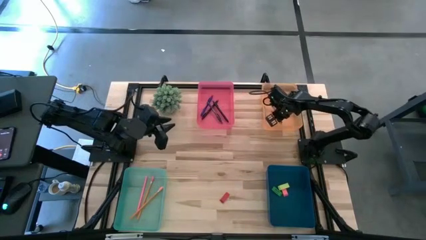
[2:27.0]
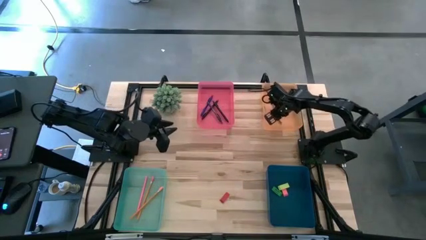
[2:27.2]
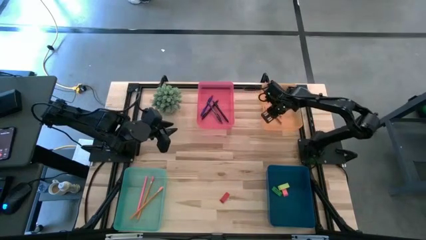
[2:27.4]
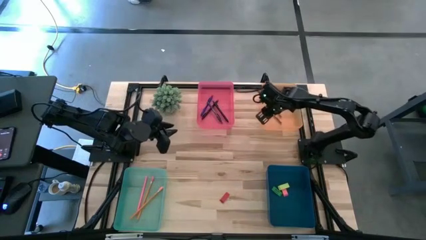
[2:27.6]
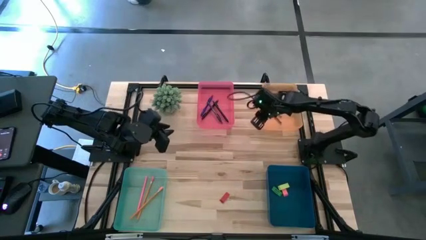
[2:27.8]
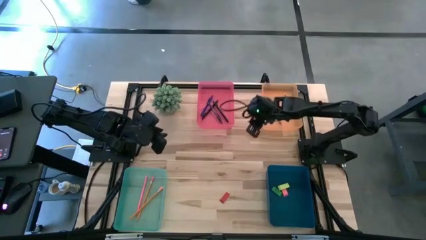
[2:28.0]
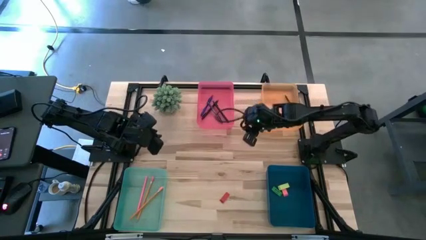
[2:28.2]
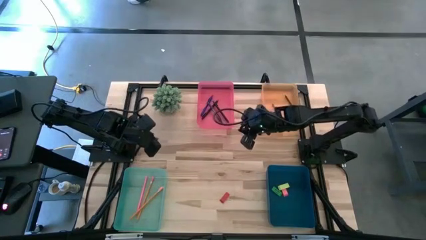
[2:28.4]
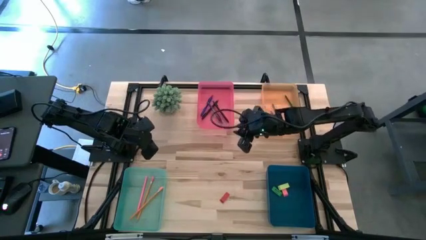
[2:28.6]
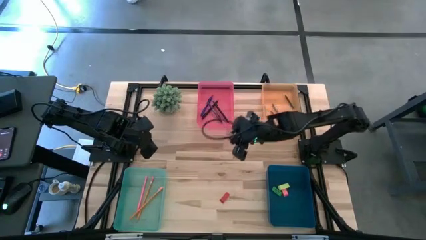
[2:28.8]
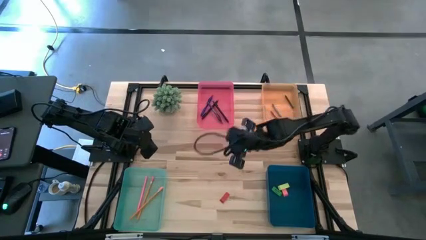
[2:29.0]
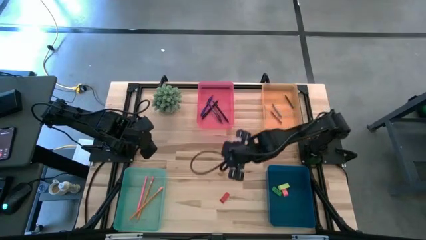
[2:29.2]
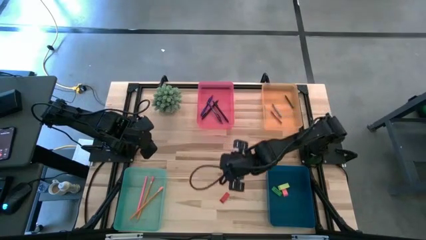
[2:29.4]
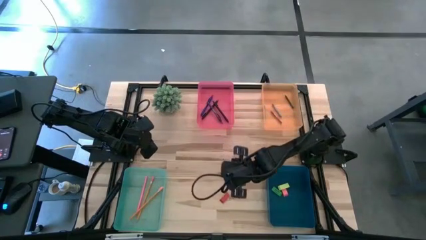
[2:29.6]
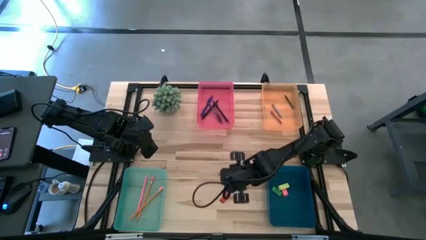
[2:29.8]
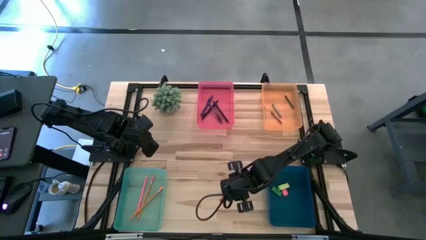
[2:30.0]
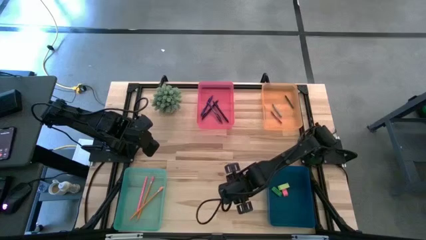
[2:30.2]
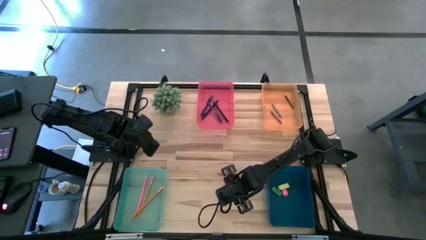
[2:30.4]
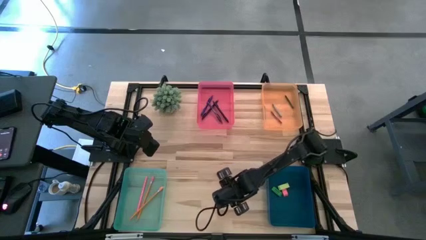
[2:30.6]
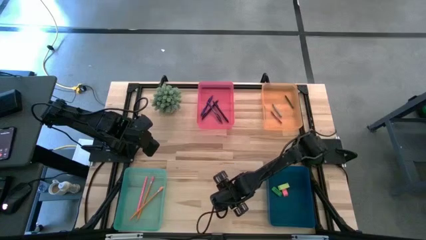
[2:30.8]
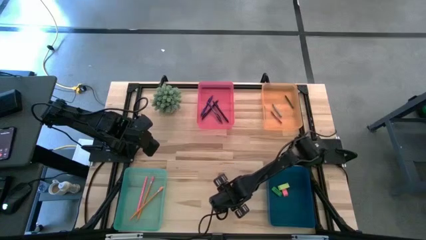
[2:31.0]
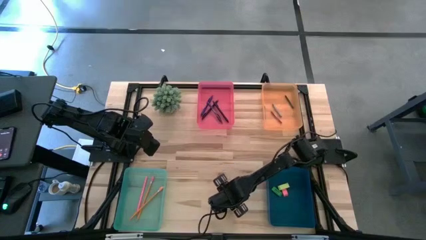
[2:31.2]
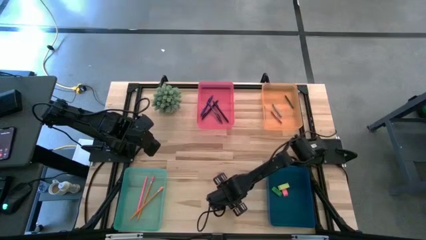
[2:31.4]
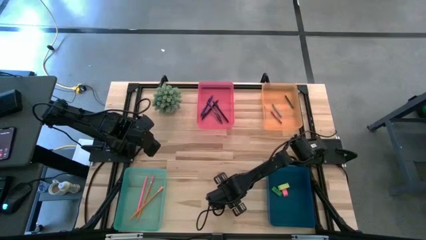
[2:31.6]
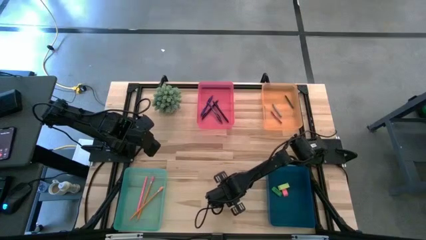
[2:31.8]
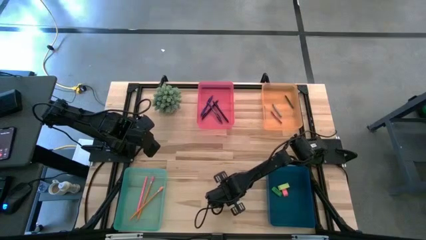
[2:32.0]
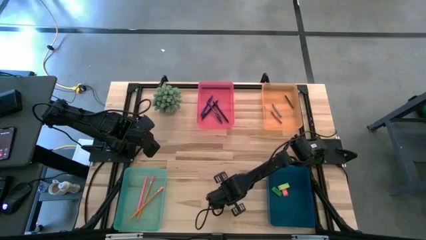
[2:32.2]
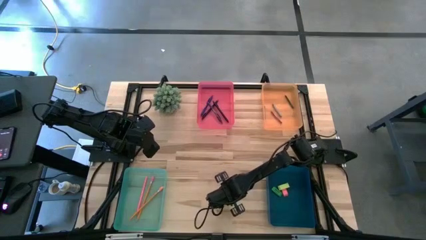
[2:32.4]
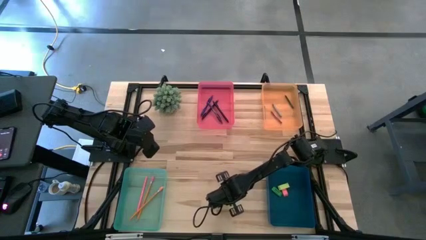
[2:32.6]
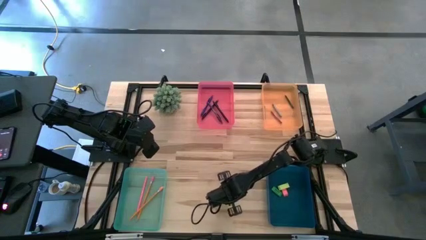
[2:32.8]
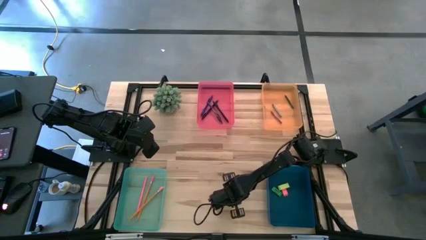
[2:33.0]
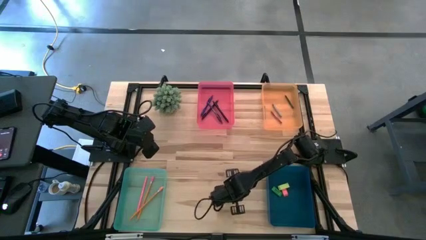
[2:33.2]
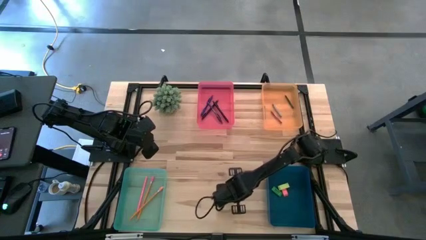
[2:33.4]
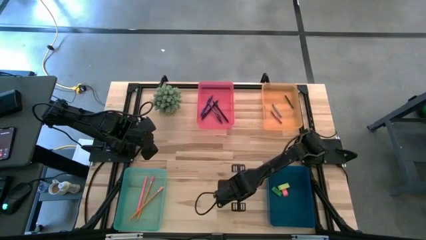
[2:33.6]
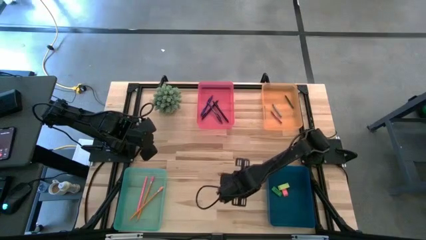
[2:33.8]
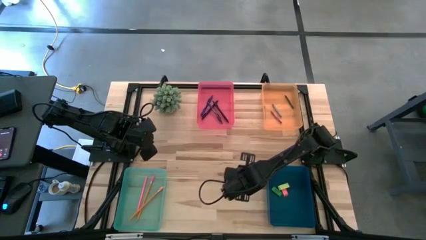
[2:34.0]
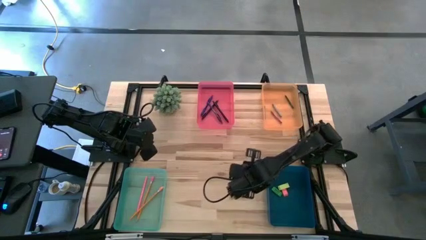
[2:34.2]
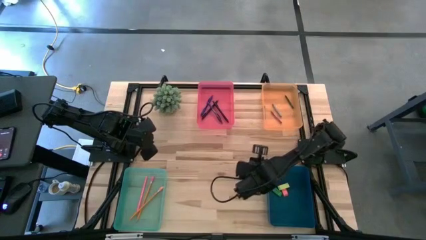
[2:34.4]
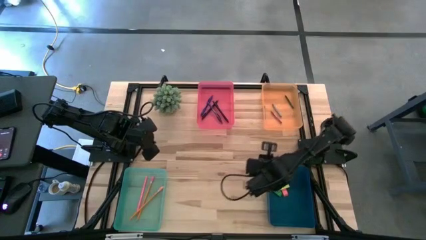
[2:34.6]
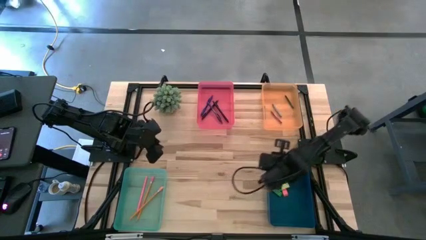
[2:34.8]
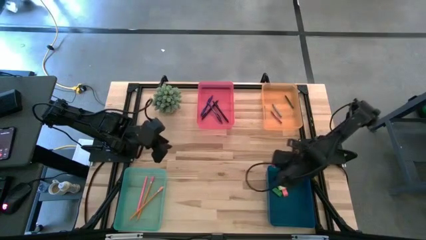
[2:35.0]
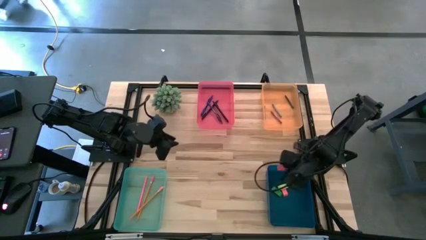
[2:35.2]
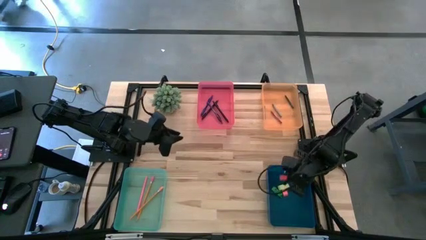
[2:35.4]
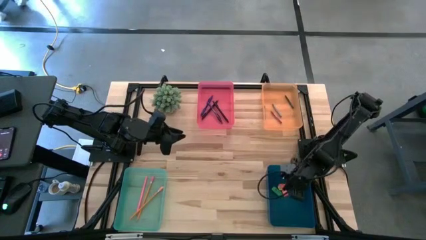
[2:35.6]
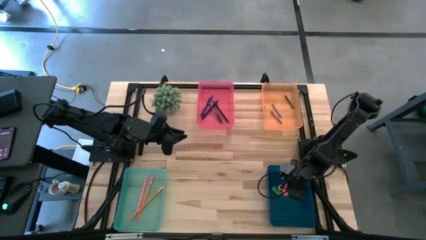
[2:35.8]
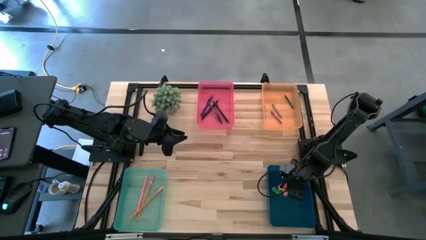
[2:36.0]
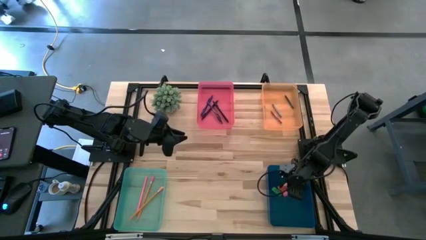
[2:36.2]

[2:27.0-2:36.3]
Task: Sort crayons/erasers/pens/pencils in bins
Put the red eraser into the blue bin

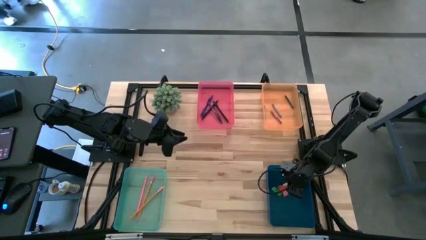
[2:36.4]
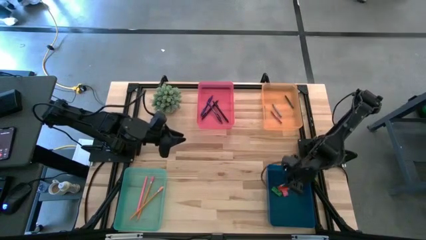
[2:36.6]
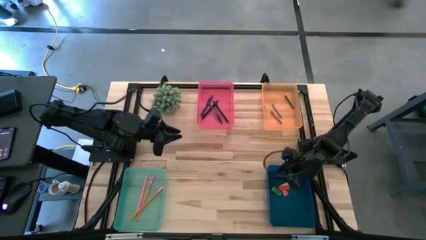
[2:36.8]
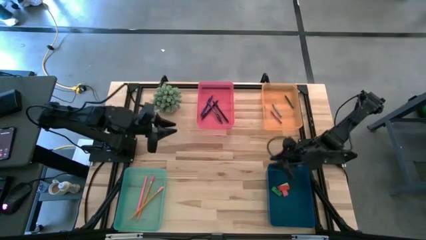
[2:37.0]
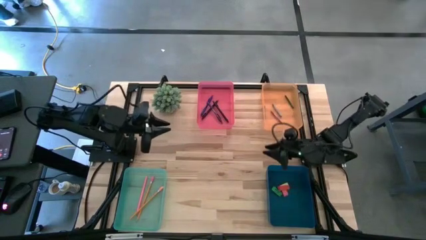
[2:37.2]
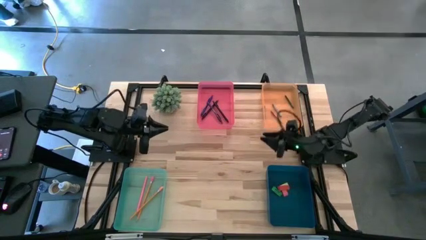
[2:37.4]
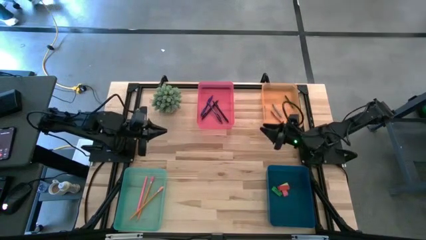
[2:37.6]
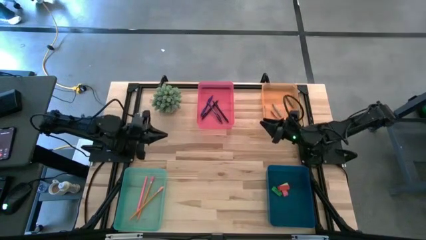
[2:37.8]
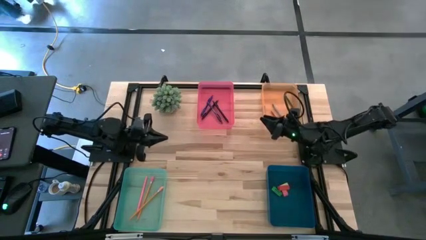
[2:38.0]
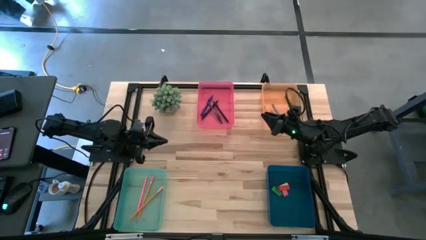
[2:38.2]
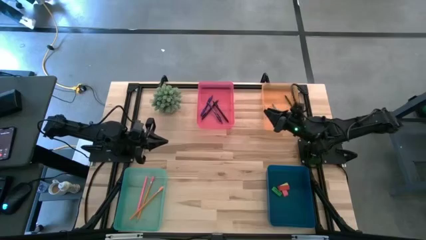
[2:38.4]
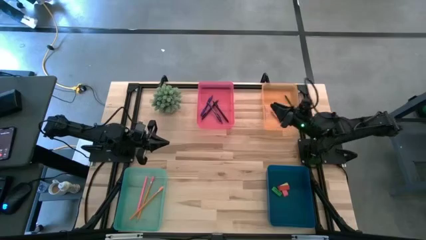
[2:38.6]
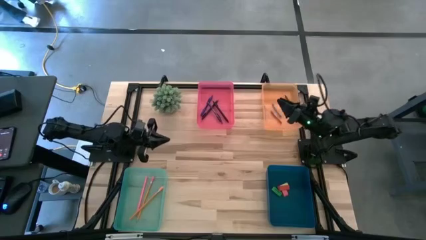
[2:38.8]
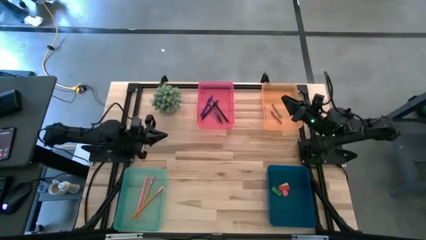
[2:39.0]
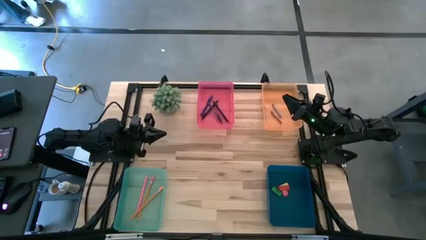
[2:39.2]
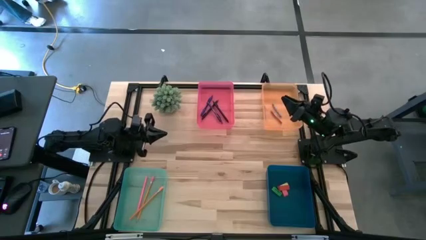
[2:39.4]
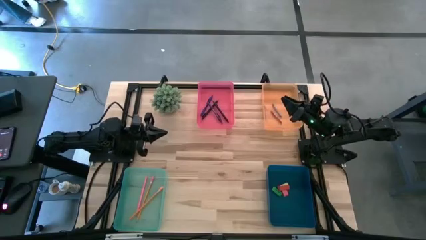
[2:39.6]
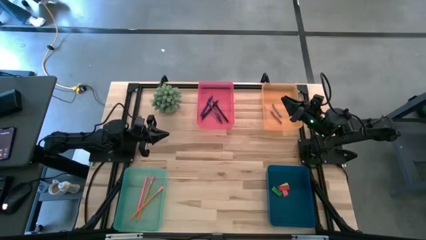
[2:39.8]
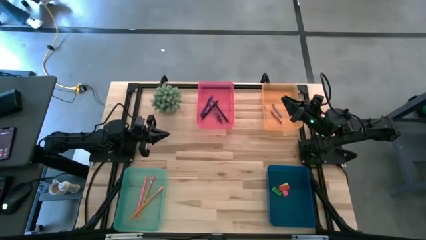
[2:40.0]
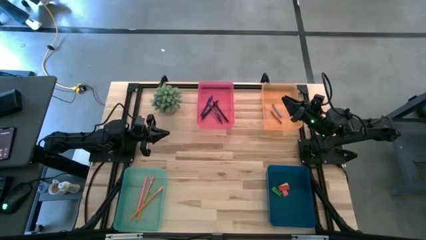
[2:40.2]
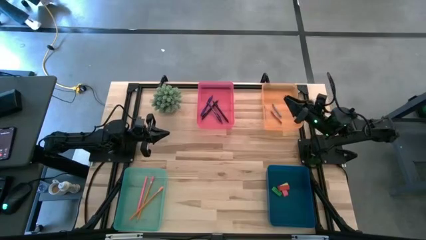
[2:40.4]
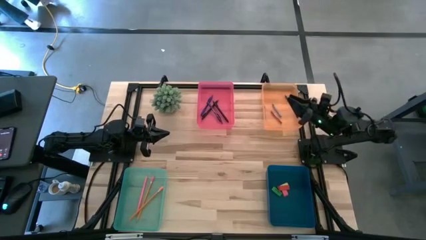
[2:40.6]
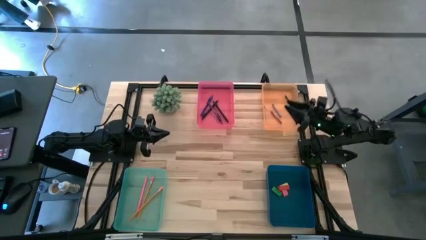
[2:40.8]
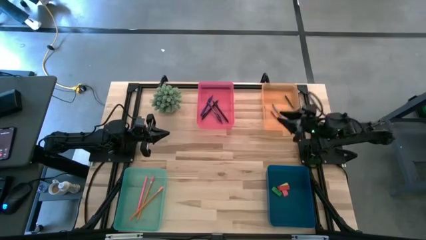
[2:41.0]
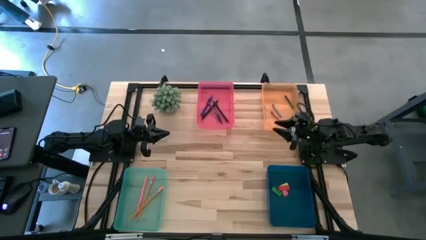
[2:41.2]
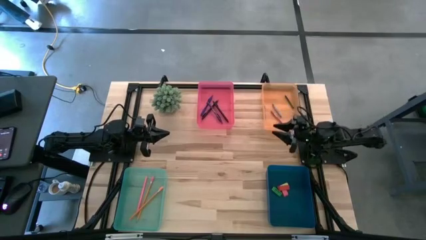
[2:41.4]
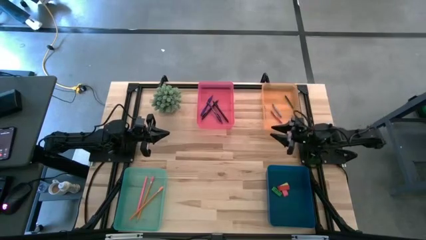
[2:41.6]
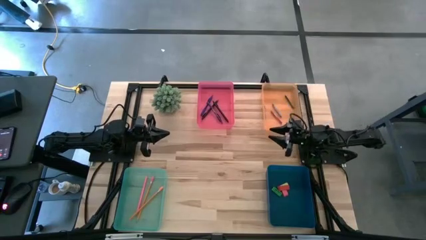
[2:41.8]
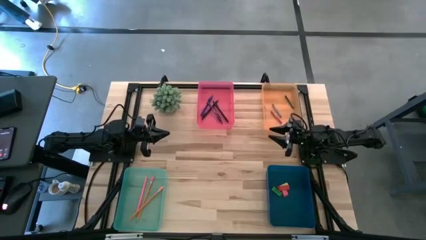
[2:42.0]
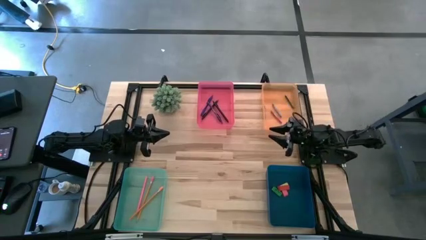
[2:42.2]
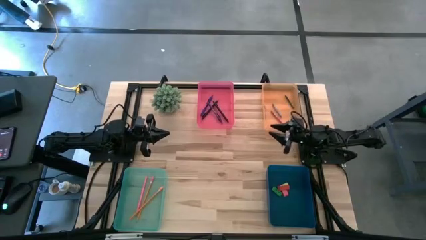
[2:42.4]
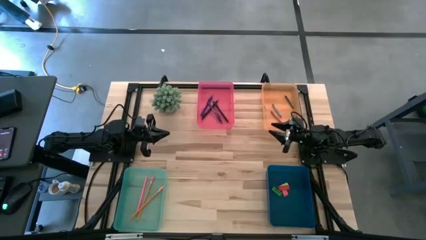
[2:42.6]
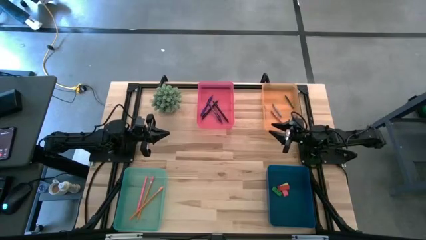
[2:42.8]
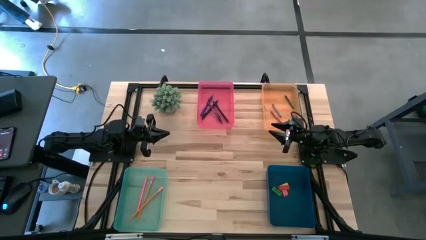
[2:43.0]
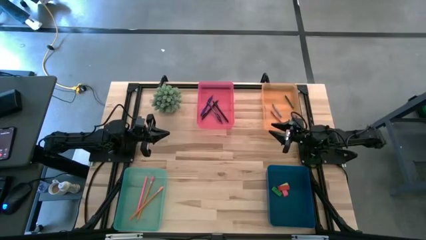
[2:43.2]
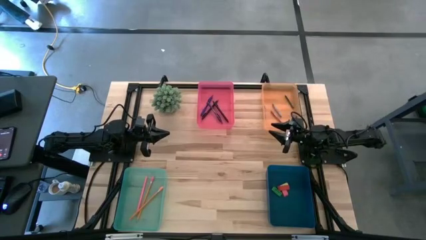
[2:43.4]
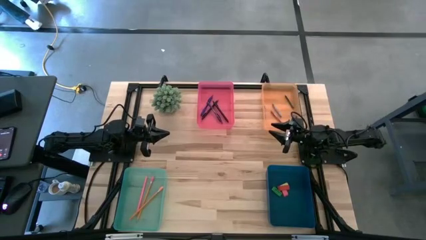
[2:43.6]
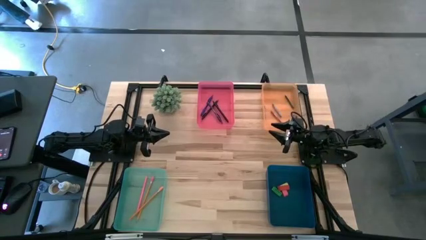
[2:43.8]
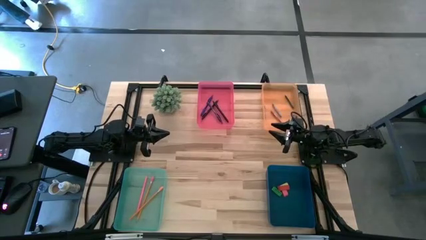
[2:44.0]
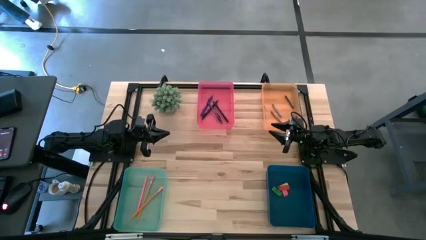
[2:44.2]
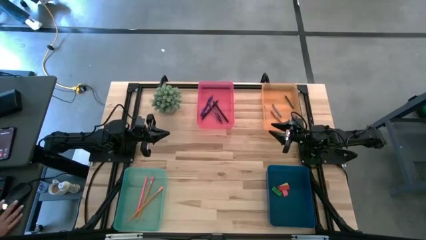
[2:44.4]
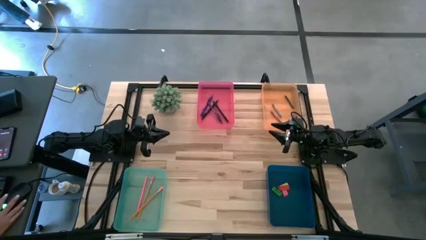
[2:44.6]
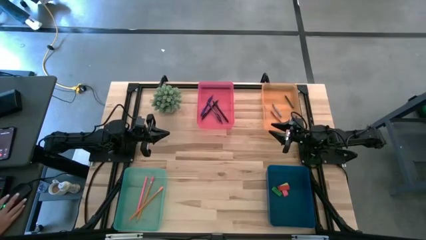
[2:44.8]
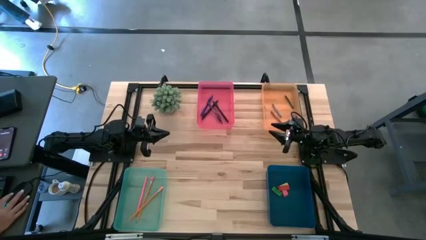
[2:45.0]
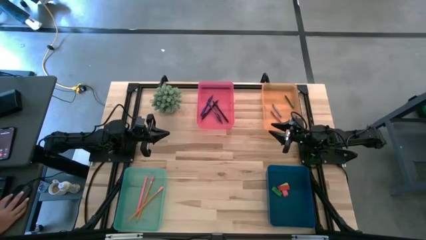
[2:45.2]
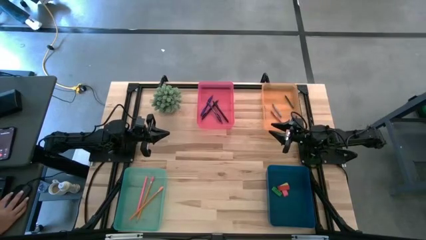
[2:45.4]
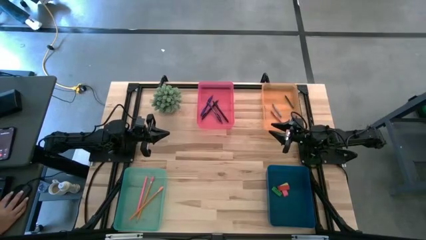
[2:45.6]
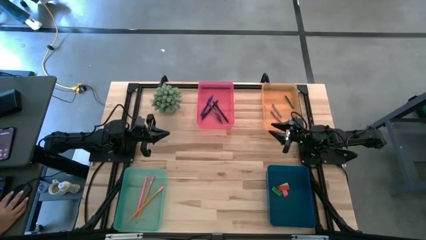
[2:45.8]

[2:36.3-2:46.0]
Return to Home Position
